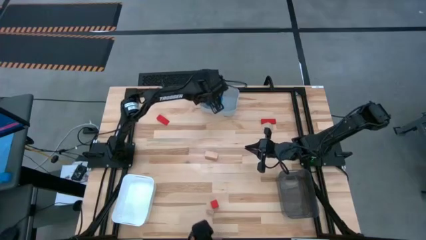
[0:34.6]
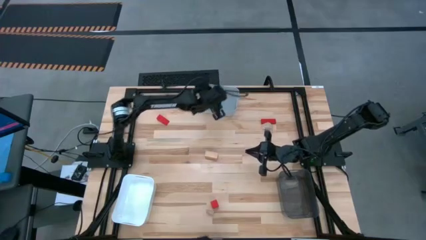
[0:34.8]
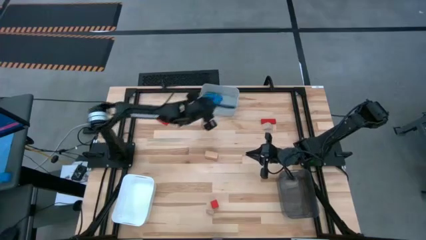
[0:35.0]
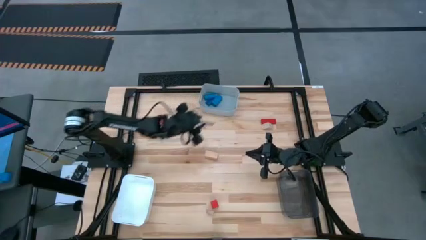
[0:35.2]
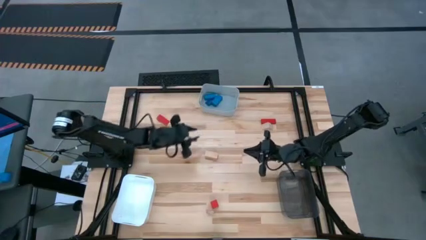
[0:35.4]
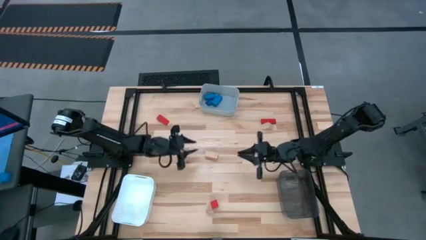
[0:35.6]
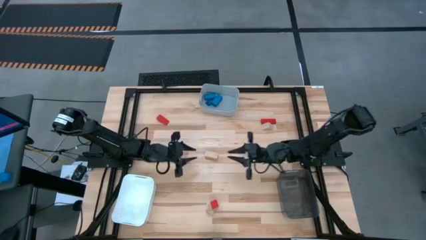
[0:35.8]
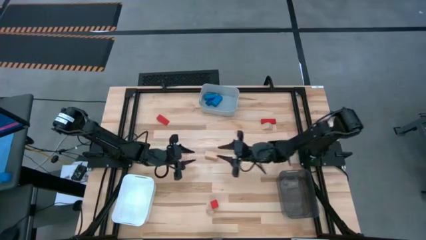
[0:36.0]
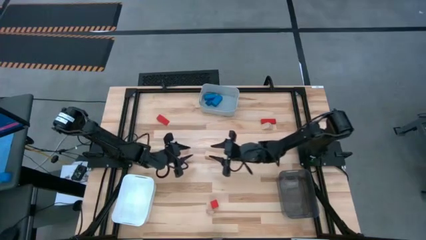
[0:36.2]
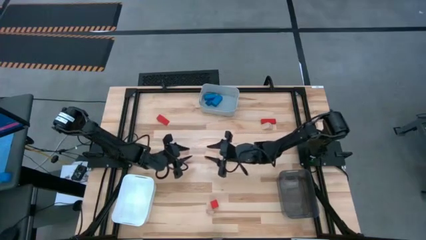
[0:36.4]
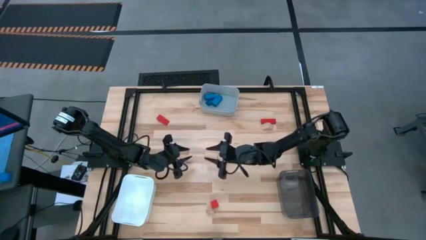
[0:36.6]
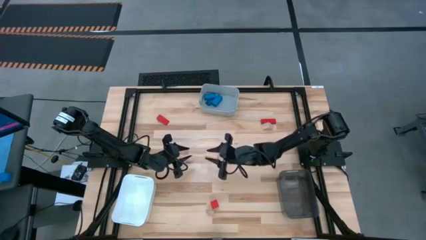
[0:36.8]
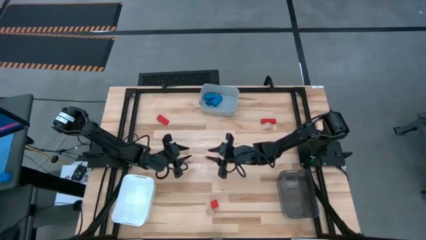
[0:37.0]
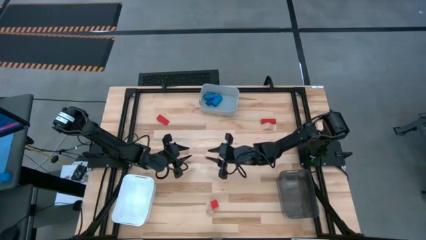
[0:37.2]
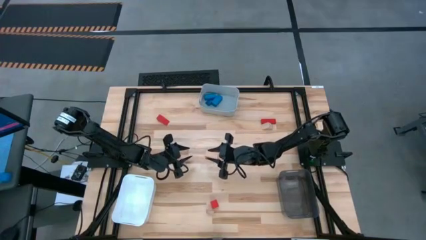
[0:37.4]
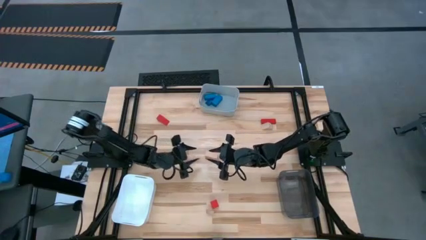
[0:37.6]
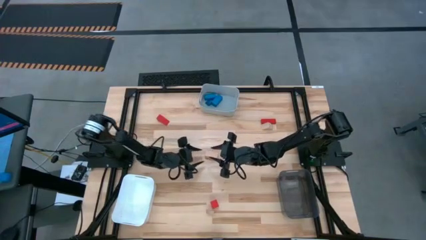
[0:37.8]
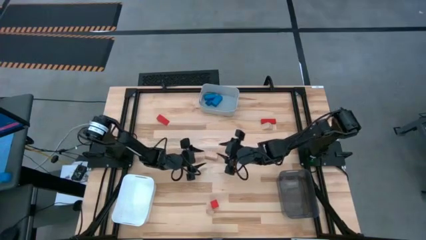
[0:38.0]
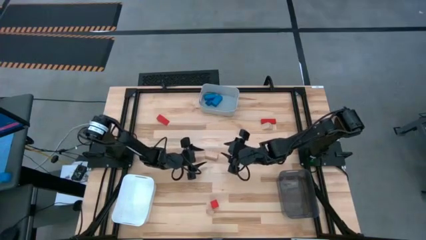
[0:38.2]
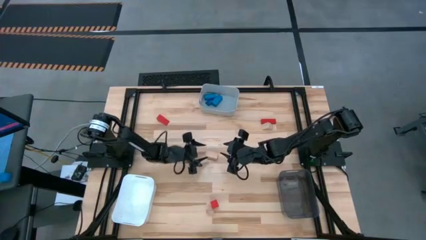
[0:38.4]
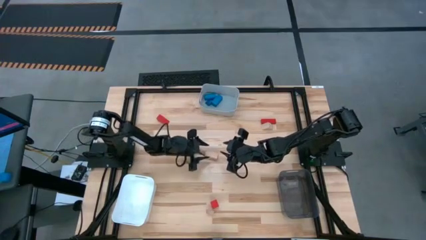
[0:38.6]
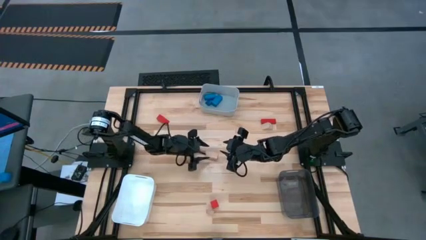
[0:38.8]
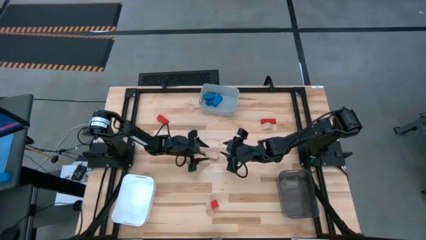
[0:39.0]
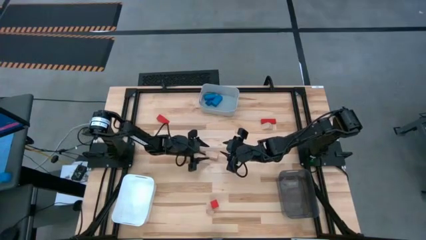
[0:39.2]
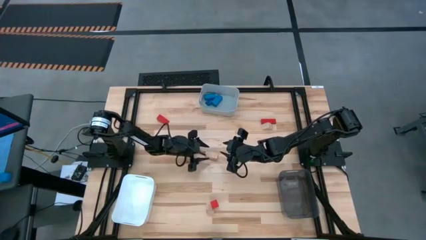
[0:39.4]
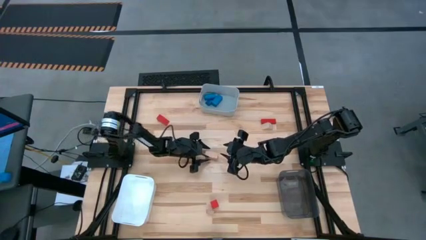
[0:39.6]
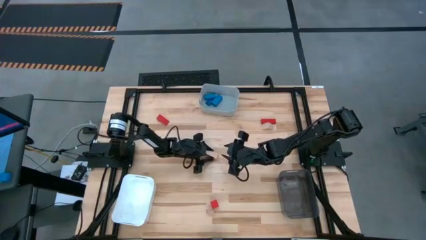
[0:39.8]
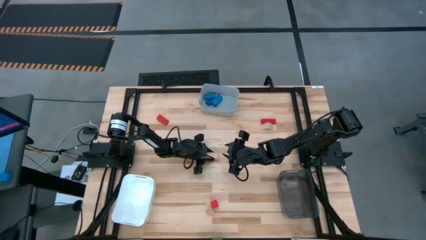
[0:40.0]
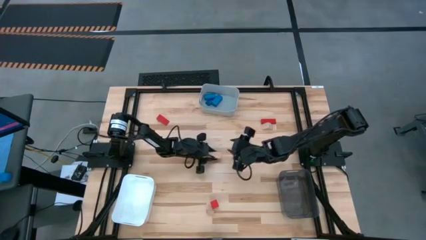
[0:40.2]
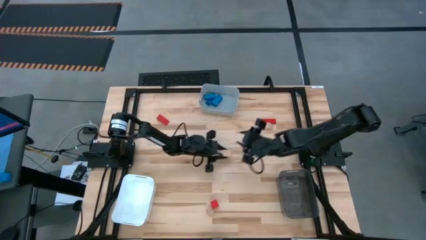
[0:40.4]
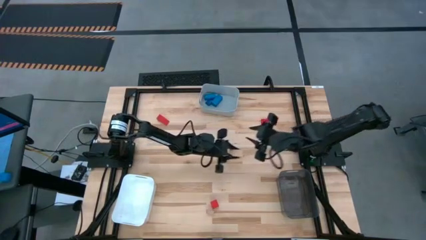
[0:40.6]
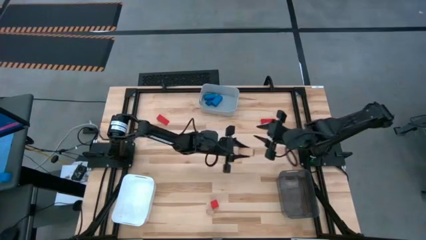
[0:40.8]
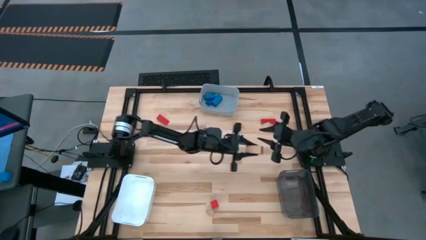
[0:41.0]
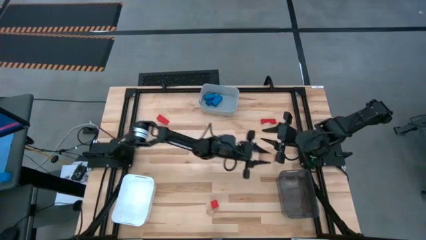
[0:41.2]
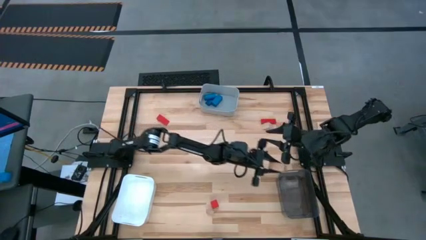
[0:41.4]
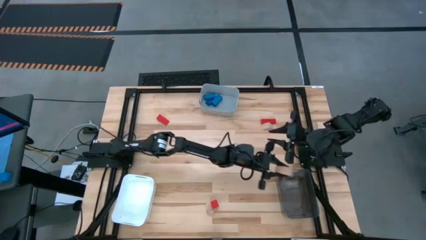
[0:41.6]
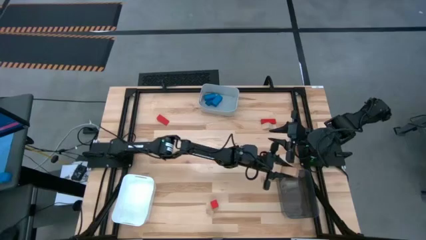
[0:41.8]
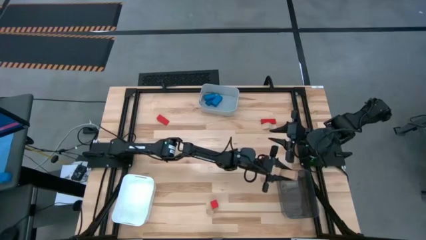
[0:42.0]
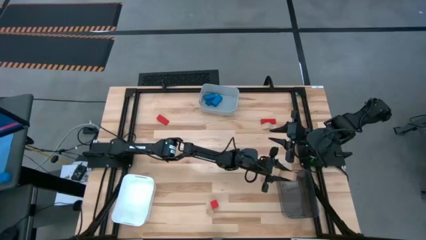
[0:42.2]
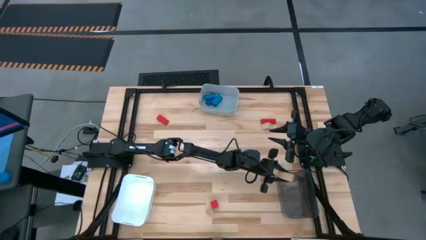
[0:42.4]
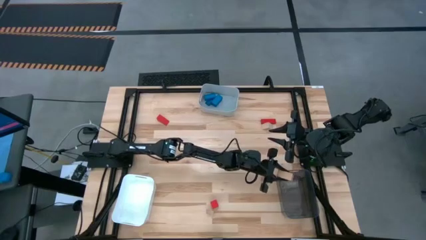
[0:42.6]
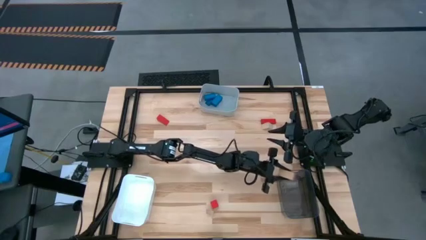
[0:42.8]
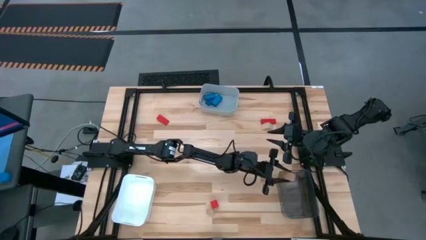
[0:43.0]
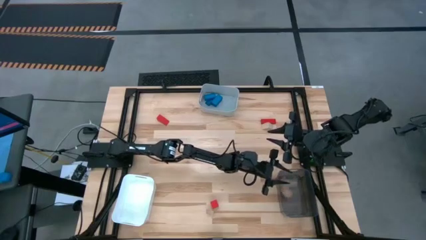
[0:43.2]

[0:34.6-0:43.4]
Task: Sort & place blocks by color
Put the brown rectangle block into the transparent black bin

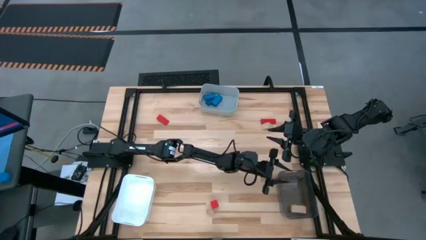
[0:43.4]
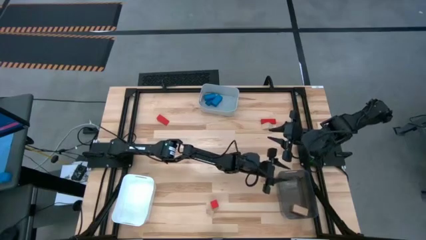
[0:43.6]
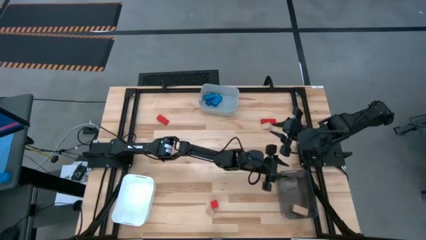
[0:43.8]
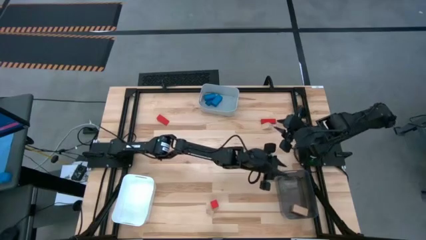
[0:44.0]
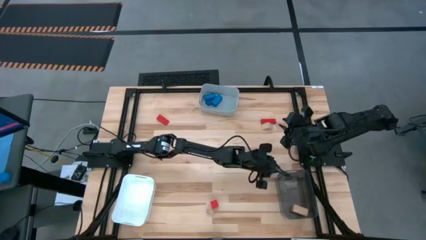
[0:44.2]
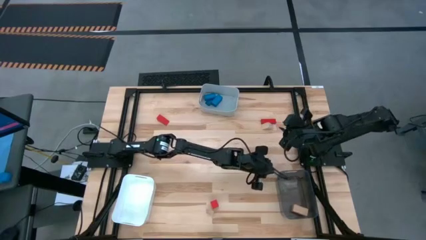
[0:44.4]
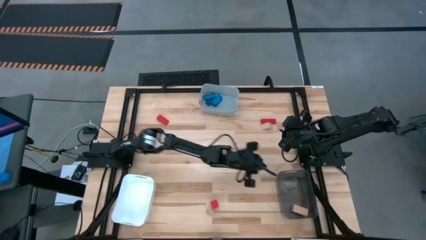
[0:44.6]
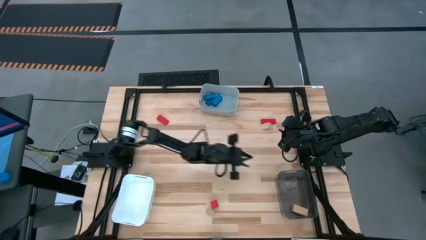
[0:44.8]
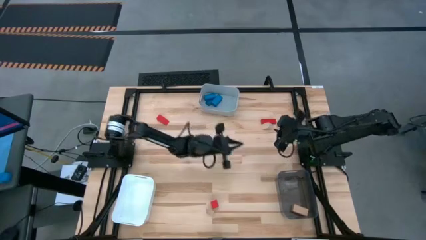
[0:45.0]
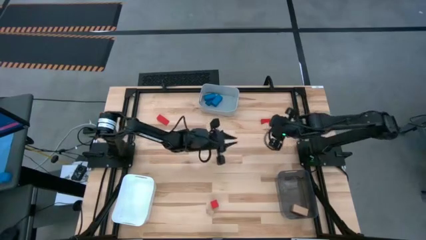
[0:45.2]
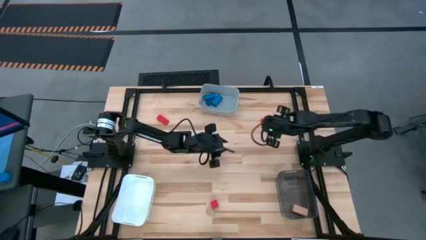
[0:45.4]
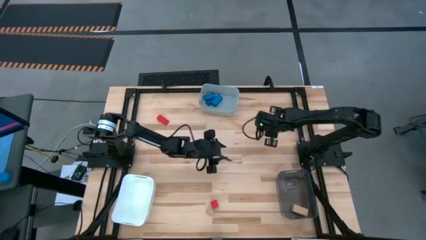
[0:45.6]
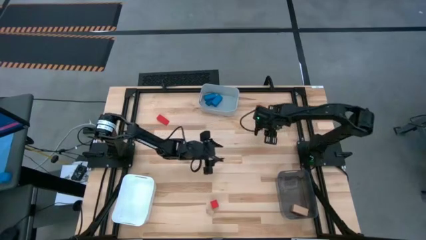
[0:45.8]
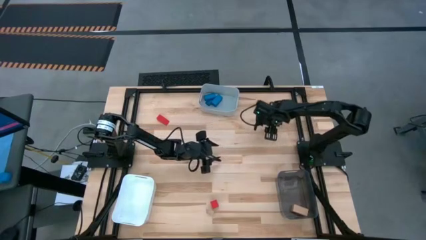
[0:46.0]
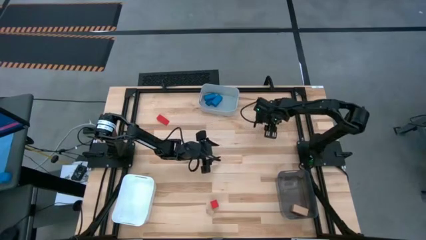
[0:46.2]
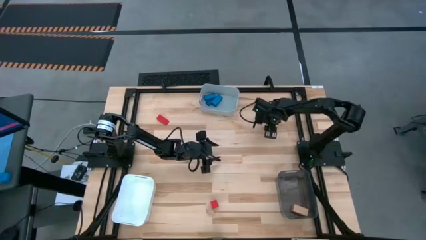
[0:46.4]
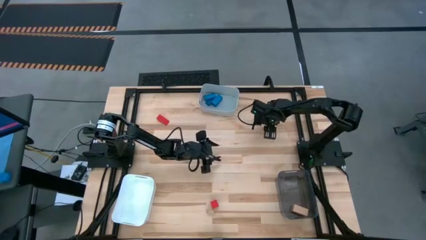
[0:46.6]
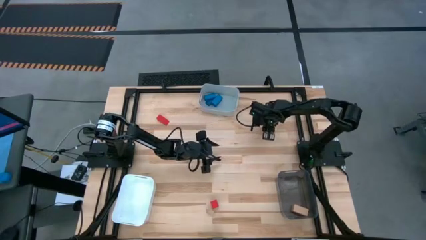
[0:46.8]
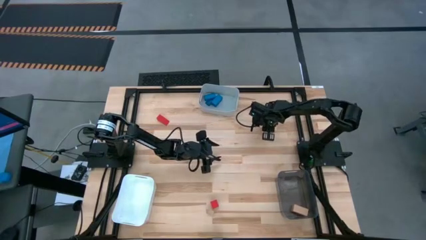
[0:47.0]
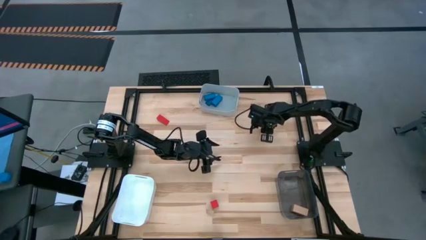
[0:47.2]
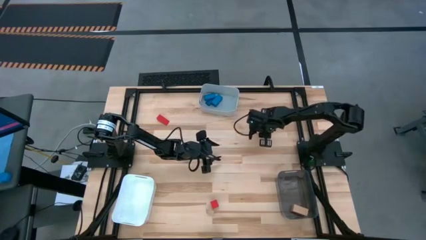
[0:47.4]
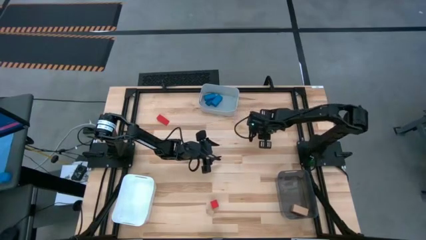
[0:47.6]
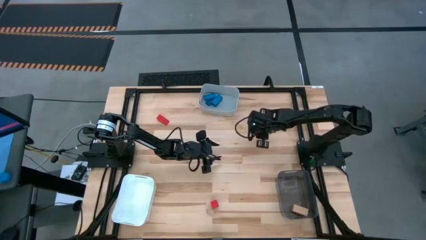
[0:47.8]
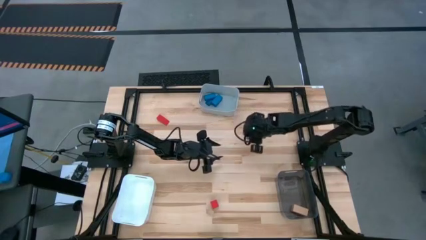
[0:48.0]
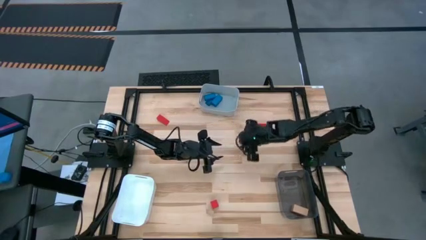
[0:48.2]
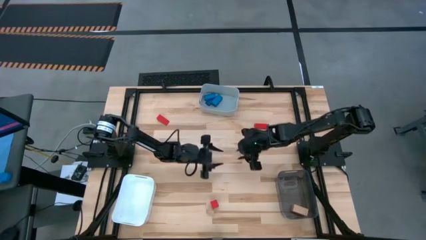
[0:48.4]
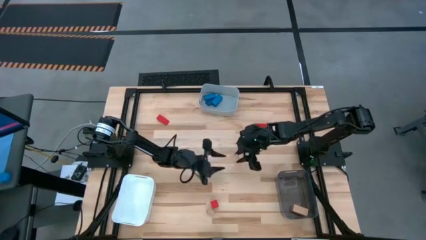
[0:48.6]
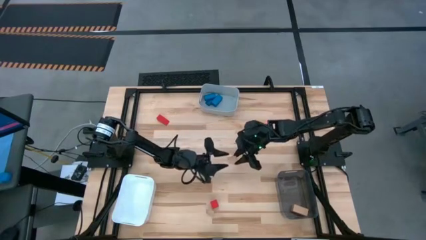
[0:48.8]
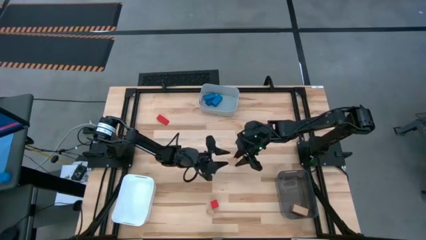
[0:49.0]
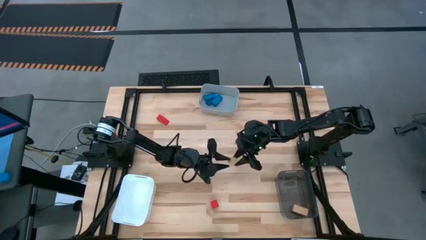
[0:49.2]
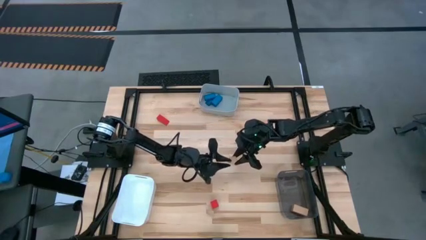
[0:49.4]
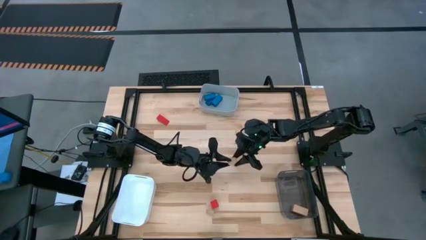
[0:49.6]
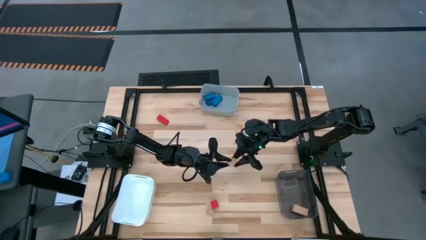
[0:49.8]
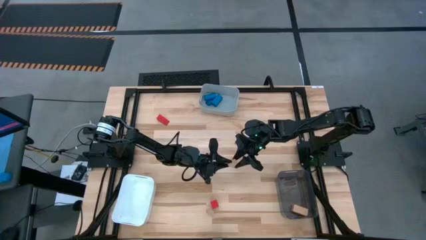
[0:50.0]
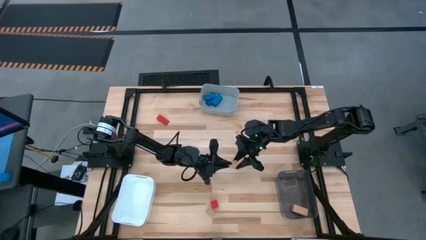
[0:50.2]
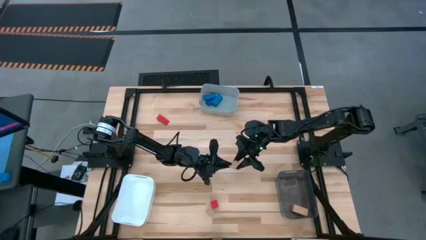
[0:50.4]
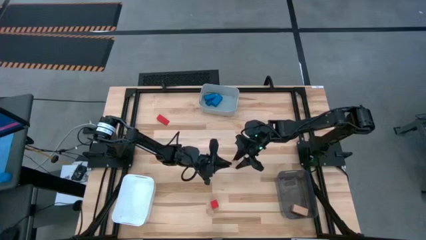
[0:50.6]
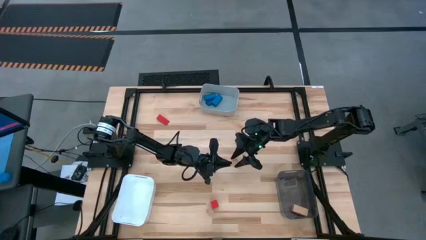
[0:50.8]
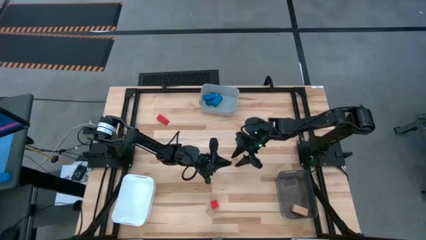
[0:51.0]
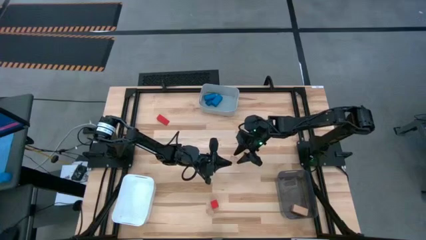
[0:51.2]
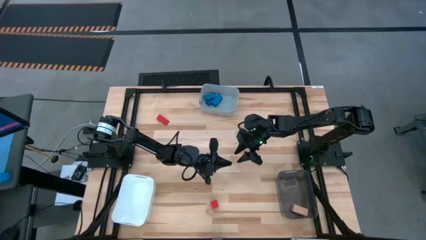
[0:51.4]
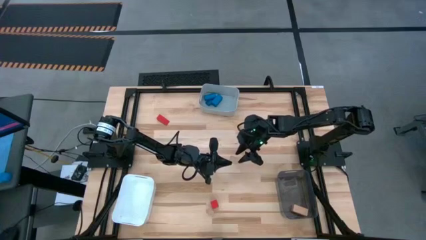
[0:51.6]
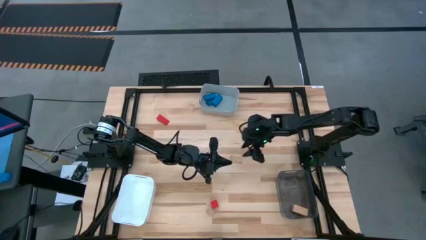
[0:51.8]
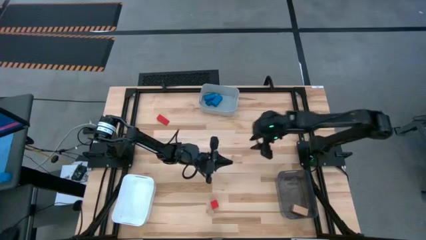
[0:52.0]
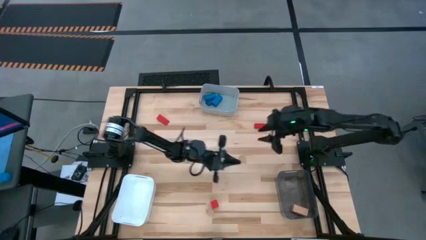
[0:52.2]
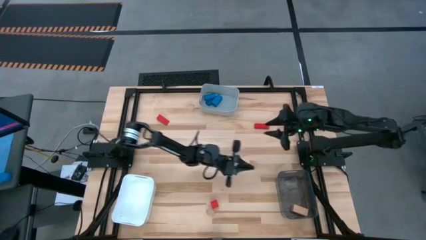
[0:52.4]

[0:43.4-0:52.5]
Put the brown triangle block into the transparent black bin
